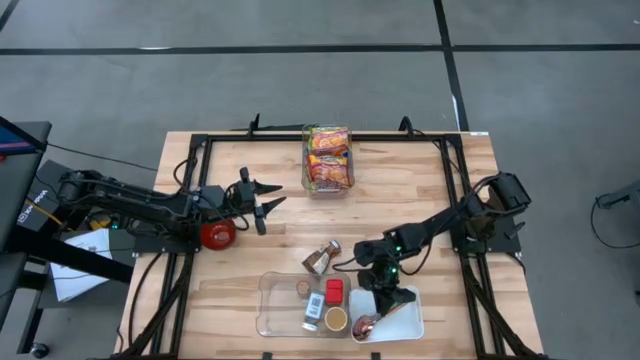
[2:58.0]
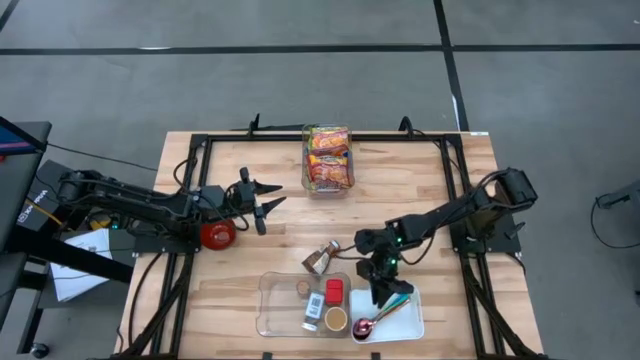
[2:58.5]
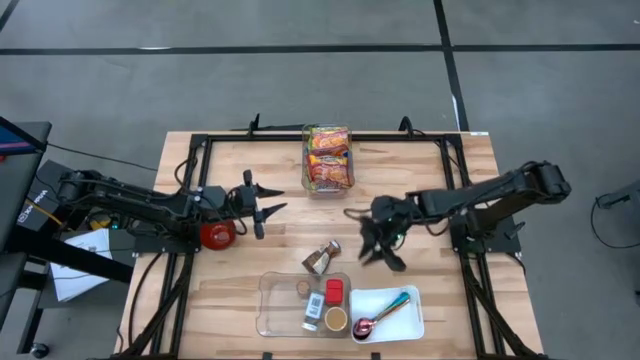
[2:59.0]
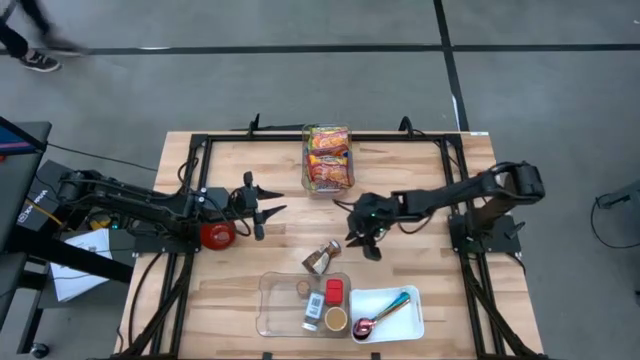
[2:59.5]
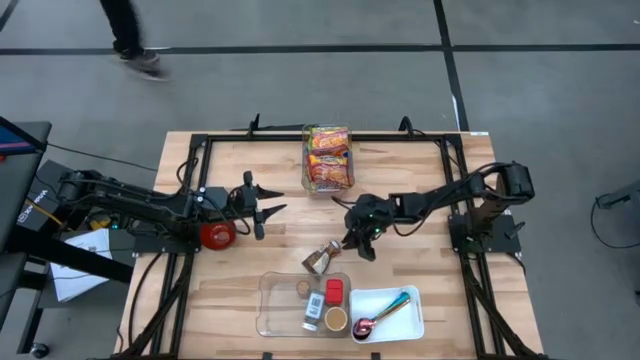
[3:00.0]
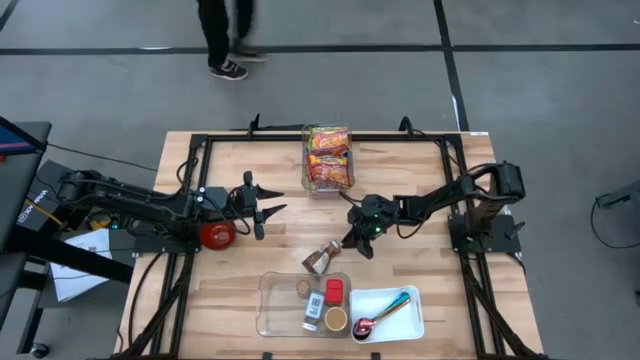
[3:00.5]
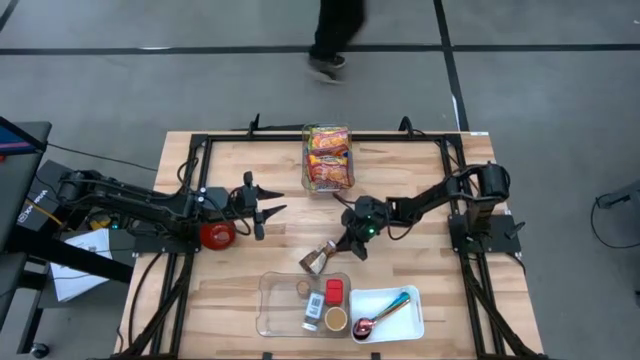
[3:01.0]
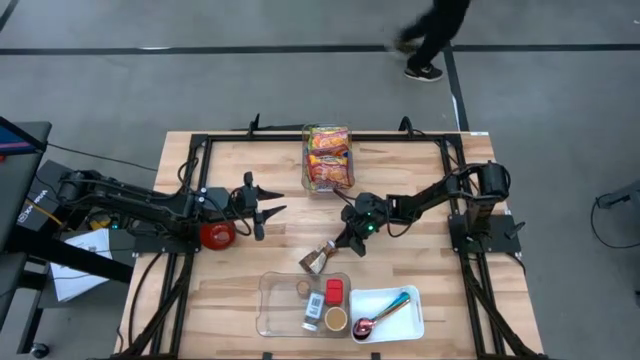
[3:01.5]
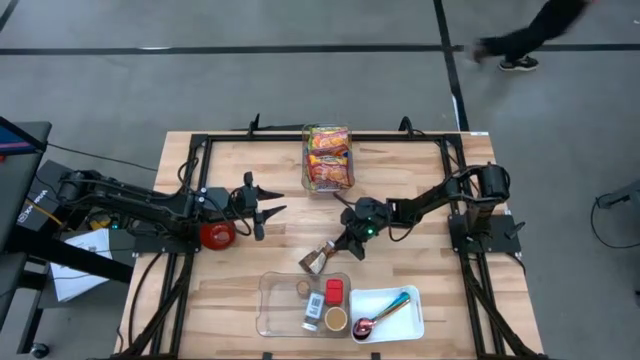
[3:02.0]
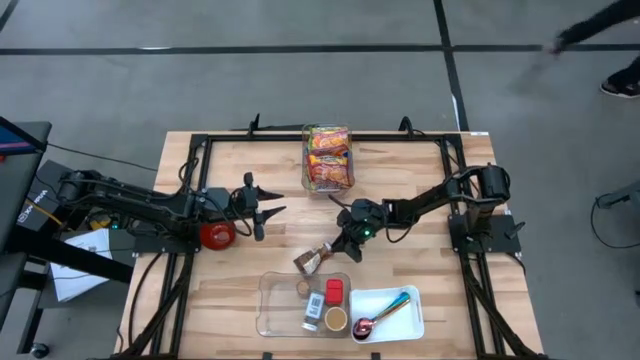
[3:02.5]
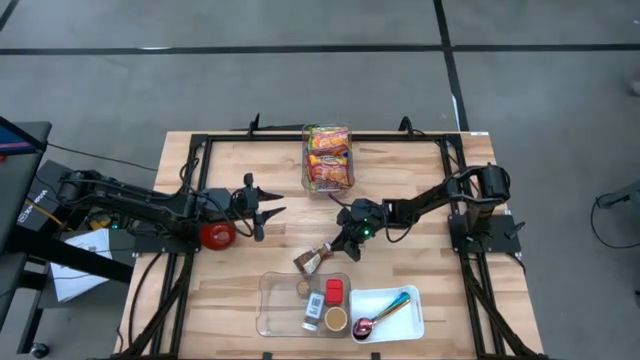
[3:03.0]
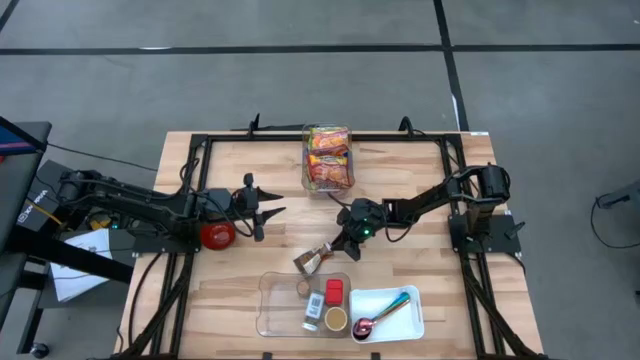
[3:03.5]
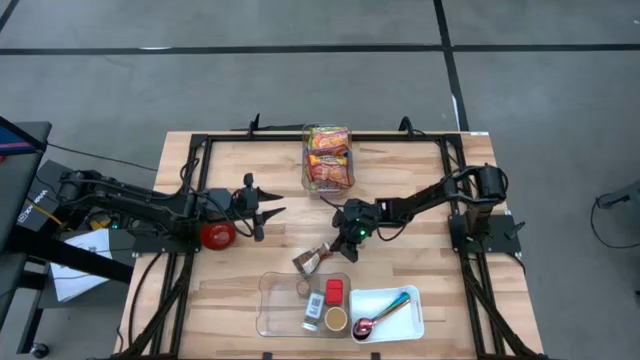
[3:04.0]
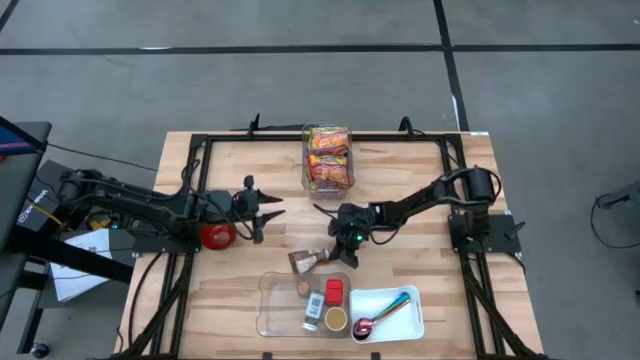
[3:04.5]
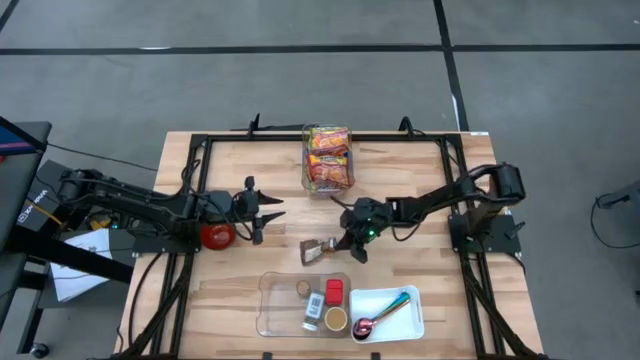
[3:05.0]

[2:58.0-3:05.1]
Task: Pick & Place Food Item
Put the orange seasoning pack into the bottom transparent bin

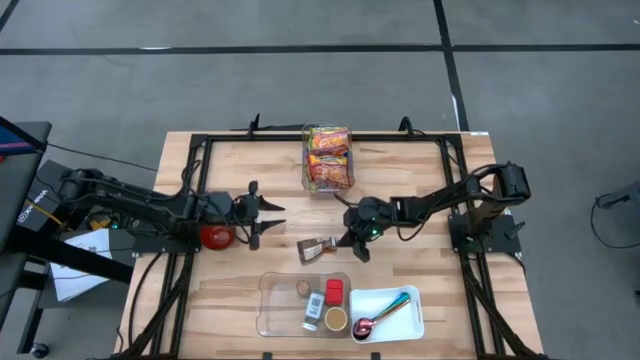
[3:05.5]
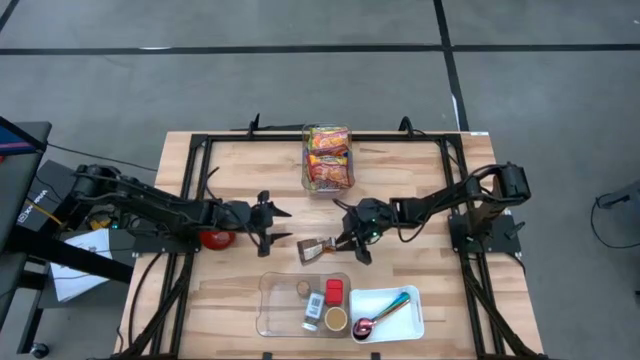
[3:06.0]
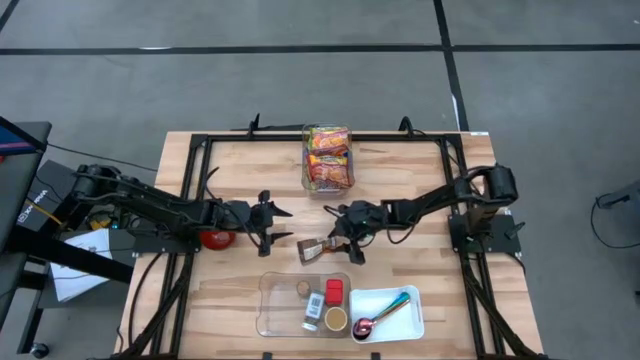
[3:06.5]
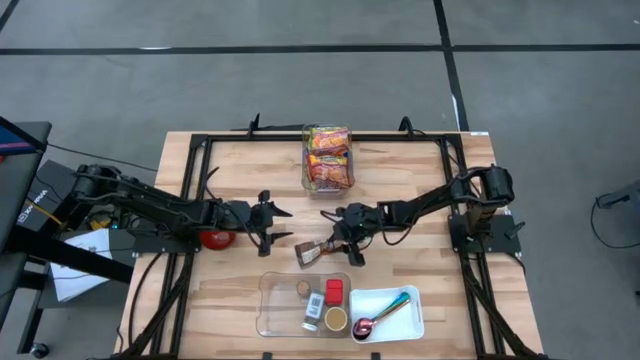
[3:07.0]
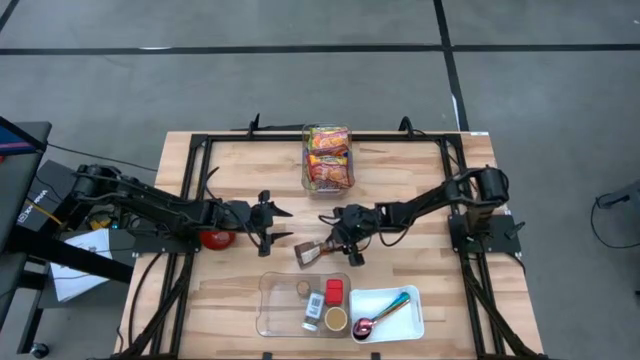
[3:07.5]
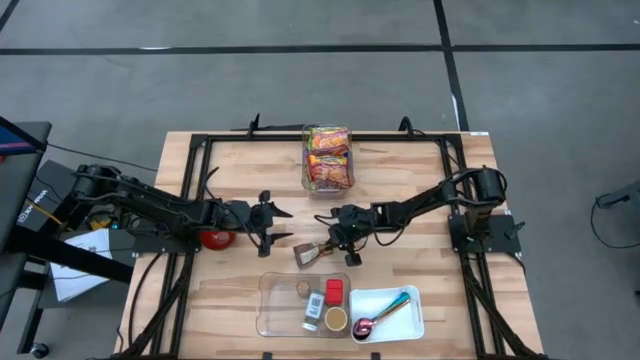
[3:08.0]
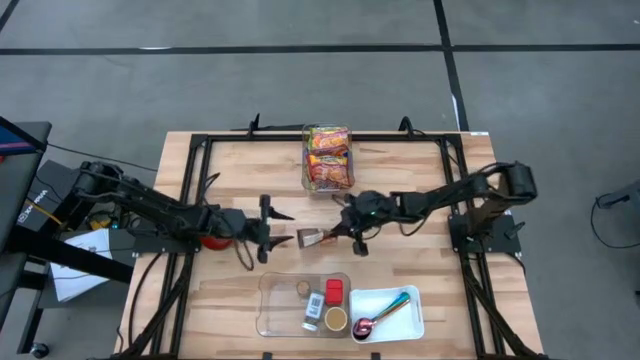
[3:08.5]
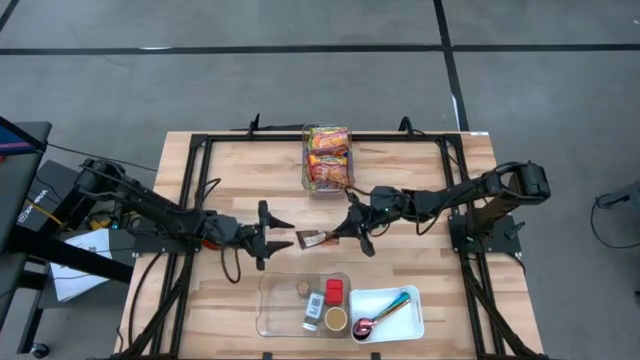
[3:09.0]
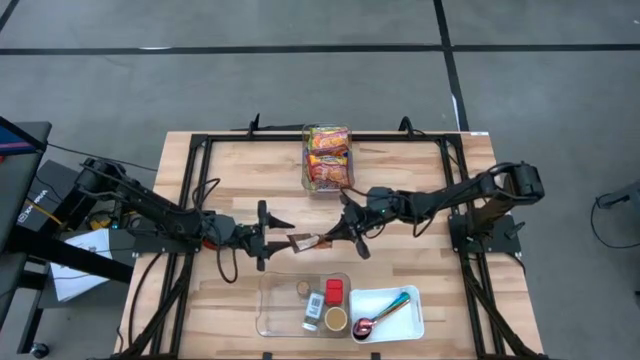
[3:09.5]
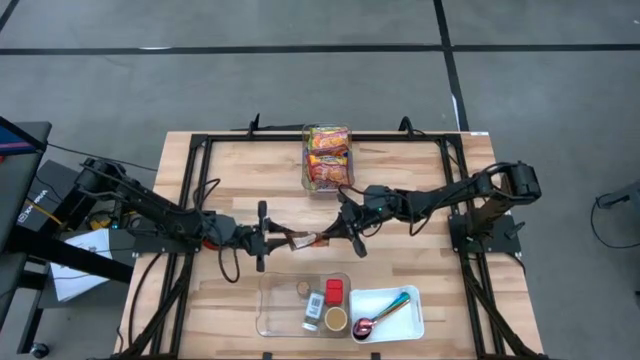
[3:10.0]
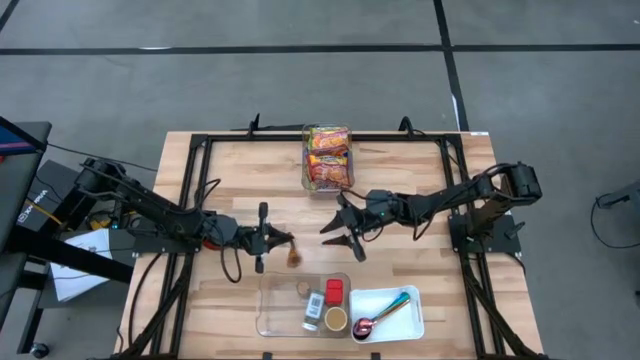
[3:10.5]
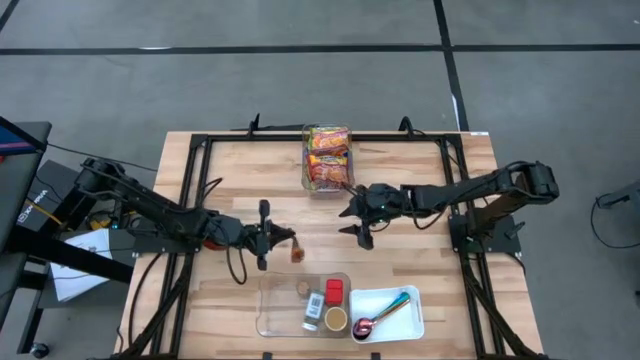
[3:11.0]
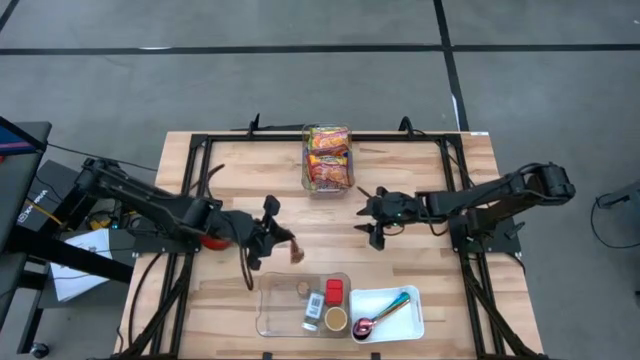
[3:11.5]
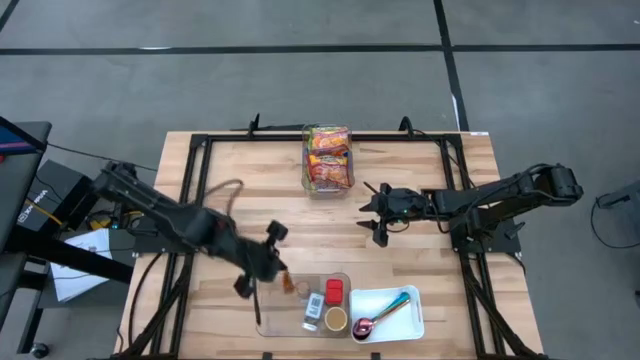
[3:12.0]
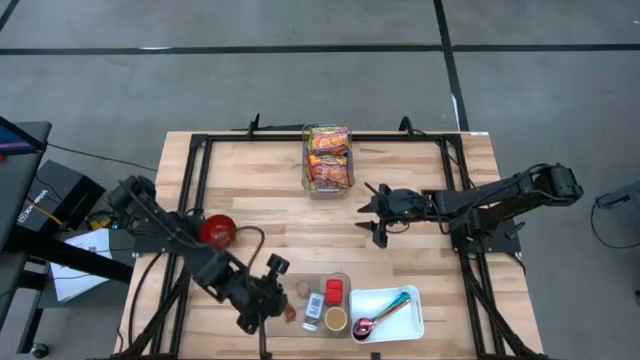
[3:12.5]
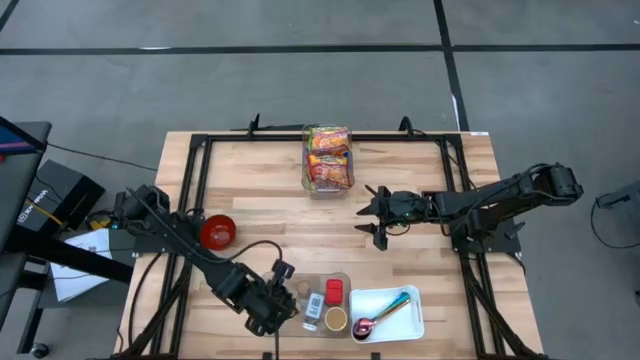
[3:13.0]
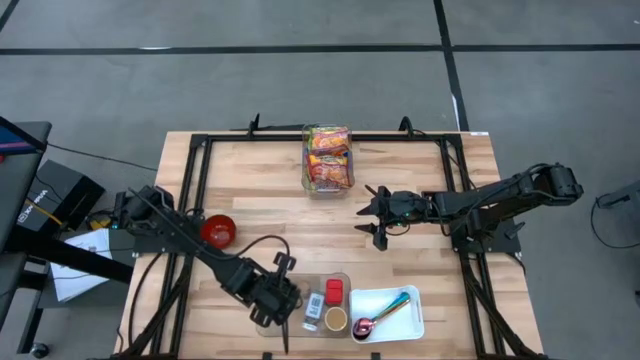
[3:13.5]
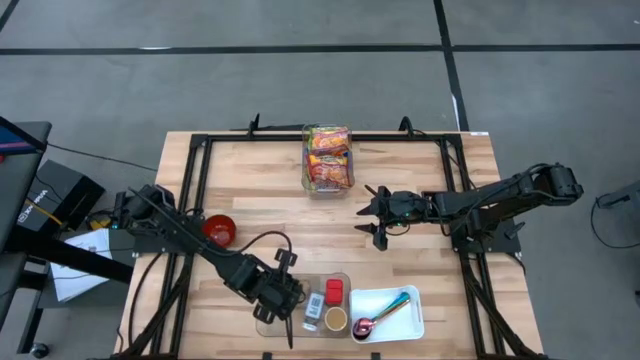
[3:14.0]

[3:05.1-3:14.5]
Put the orange seasoning pack into the bottom transparent bin

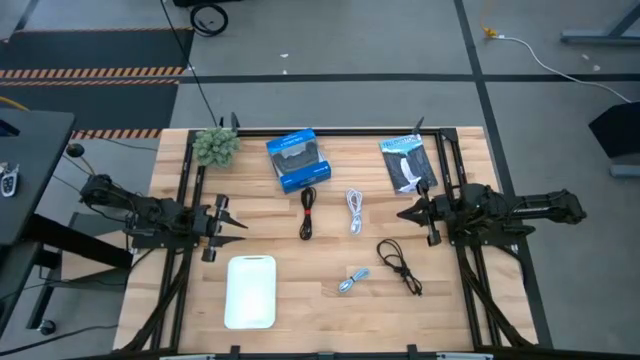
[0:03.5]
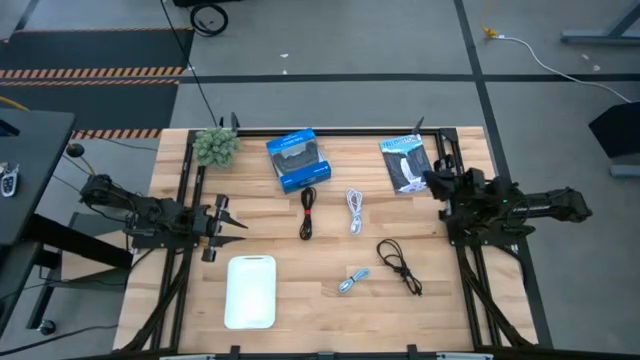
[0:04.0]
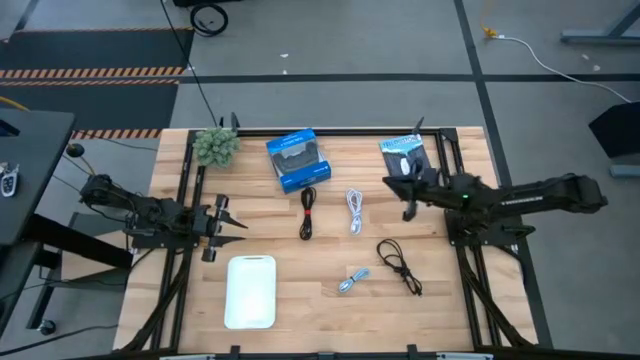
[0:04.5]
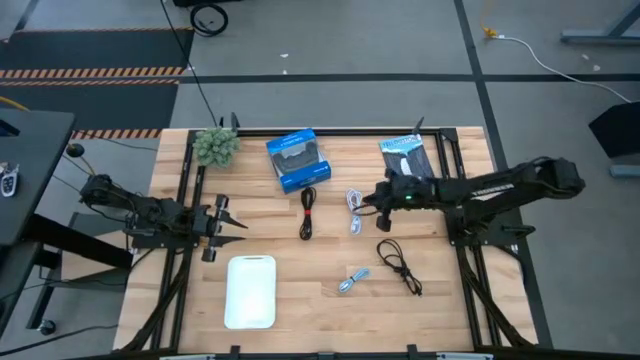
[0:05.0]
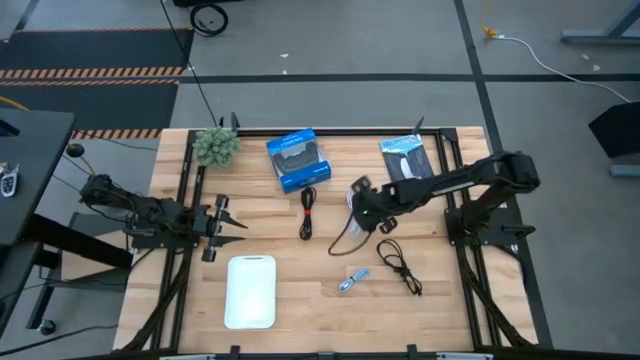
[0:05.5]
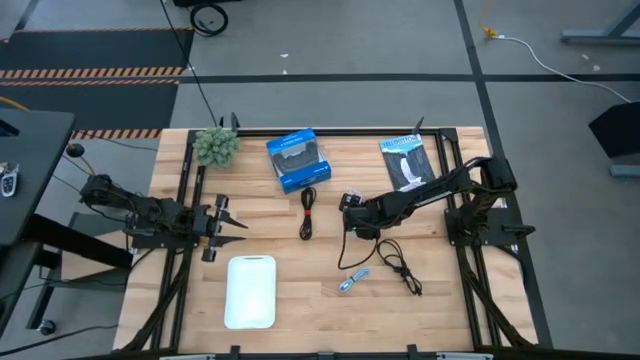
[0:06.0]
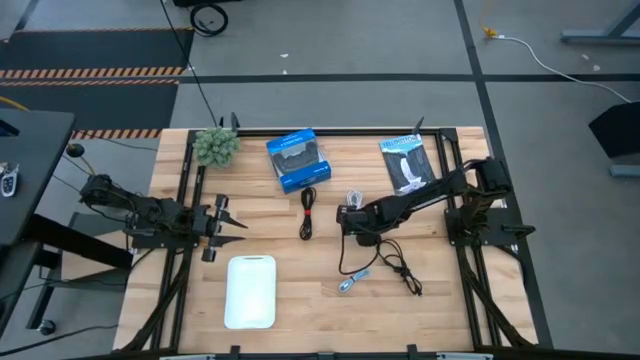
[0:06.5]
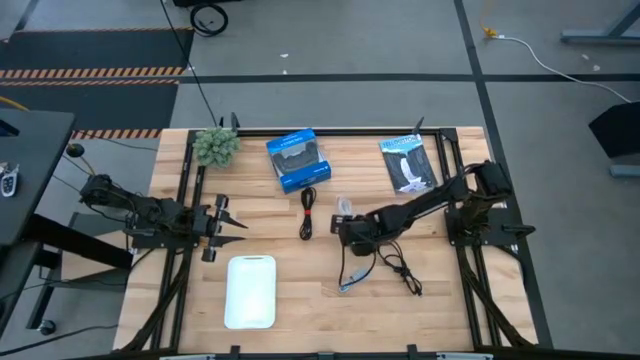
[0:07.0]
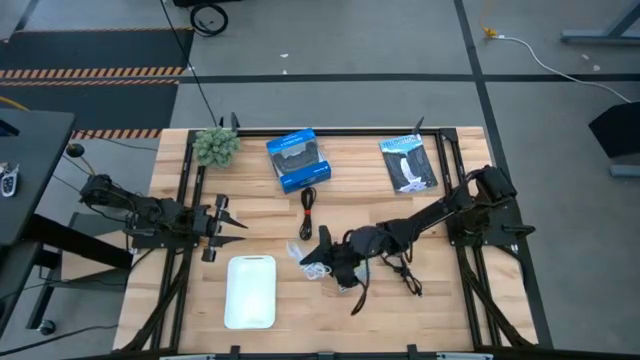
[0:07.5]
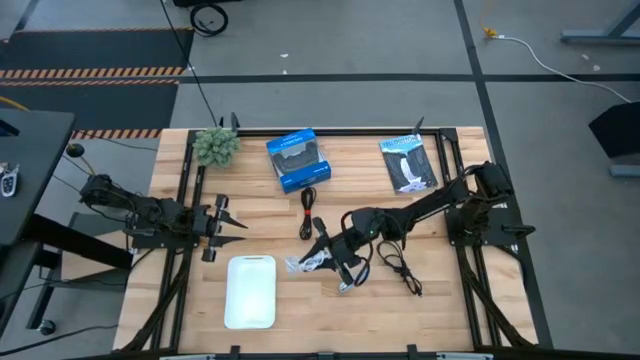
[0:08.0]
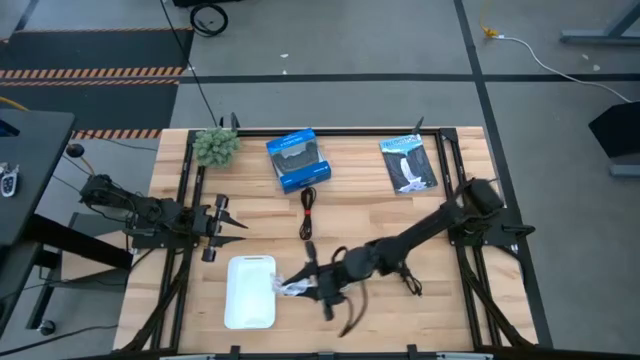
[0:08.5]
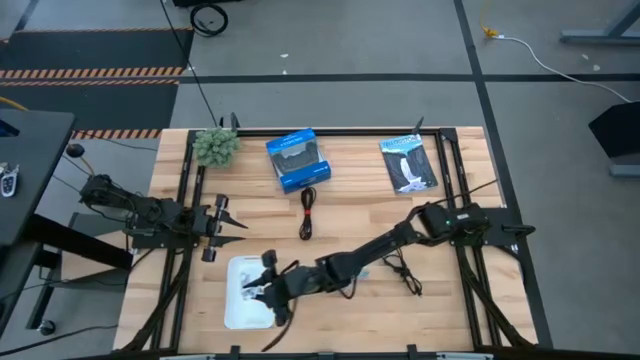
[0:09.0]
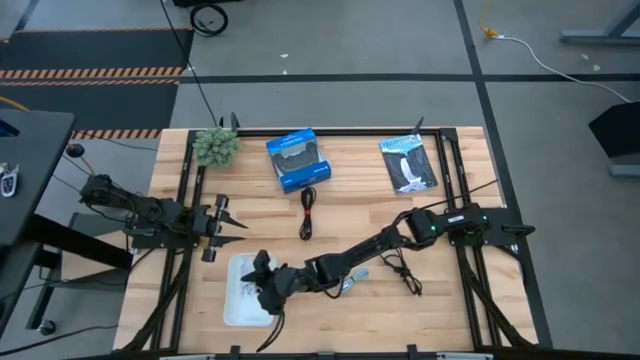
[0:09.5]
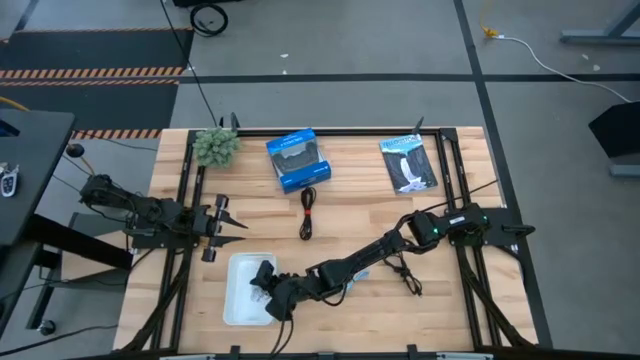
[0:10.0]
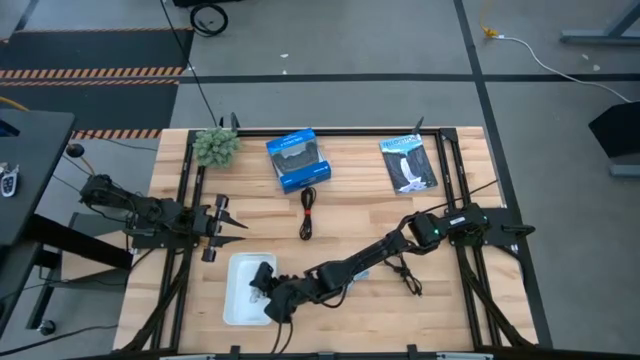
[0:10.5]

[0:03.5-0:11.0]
Task: Pick and place USB-C Cables
Put the white charger cable into the white bin
